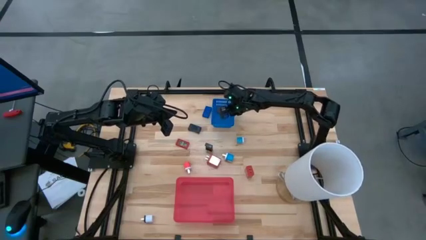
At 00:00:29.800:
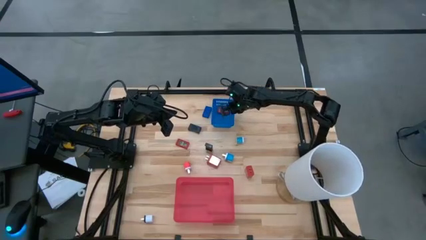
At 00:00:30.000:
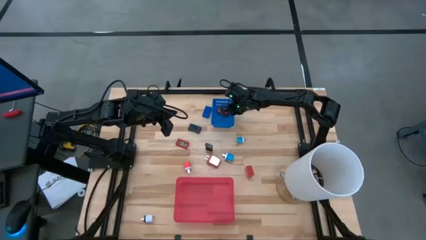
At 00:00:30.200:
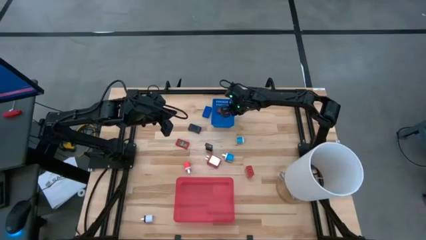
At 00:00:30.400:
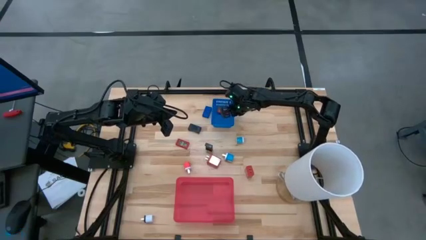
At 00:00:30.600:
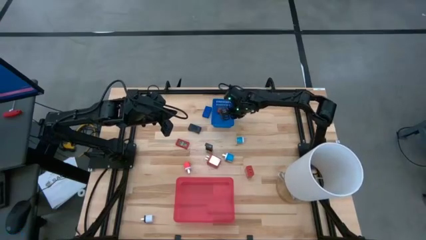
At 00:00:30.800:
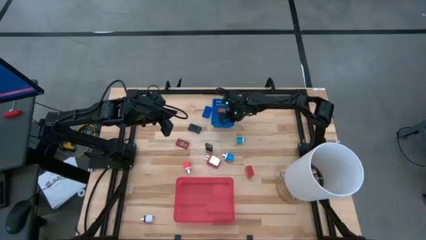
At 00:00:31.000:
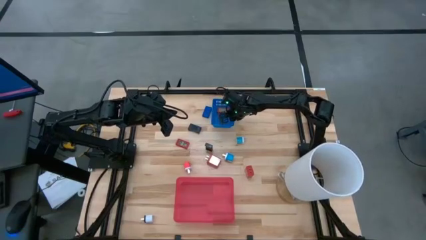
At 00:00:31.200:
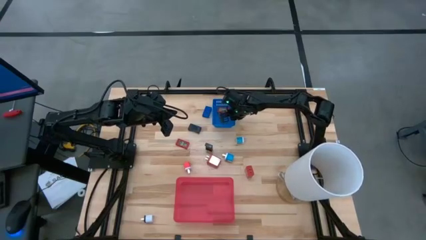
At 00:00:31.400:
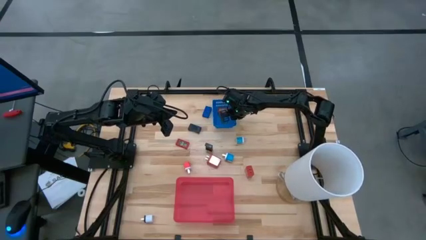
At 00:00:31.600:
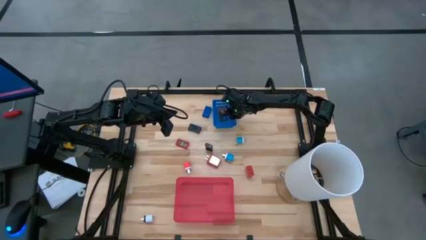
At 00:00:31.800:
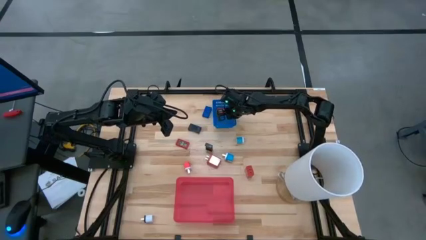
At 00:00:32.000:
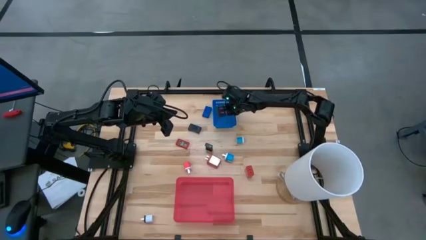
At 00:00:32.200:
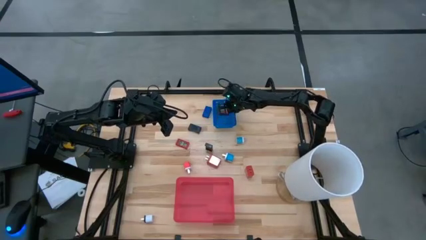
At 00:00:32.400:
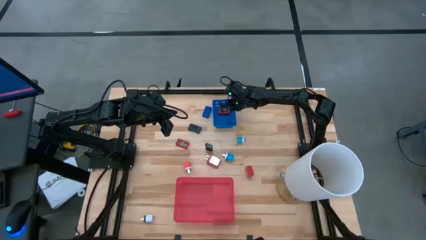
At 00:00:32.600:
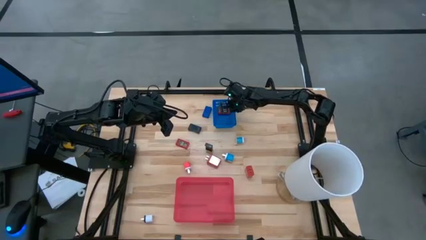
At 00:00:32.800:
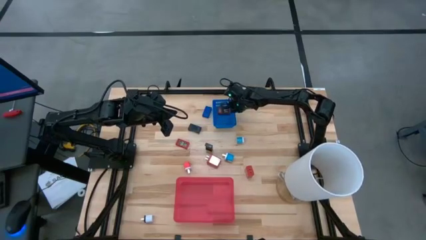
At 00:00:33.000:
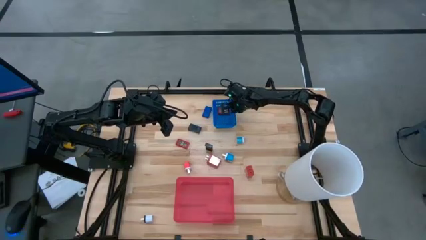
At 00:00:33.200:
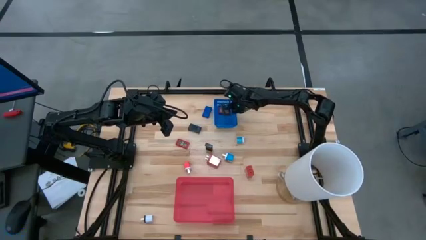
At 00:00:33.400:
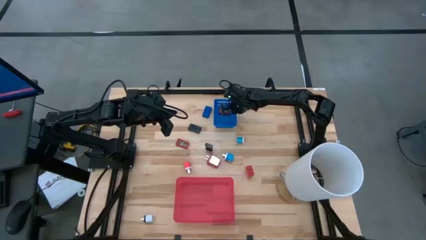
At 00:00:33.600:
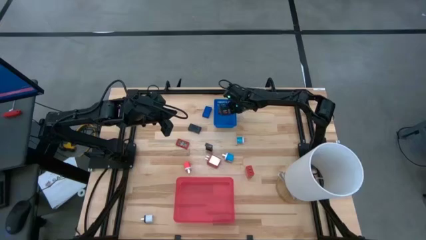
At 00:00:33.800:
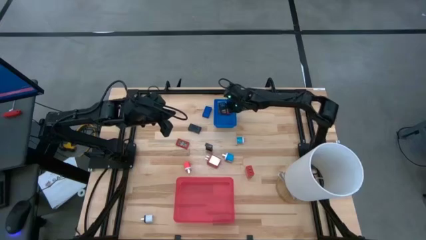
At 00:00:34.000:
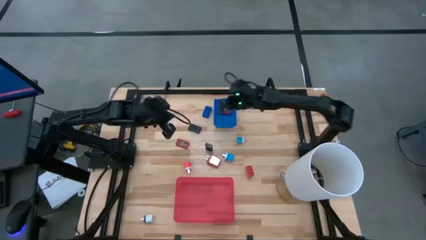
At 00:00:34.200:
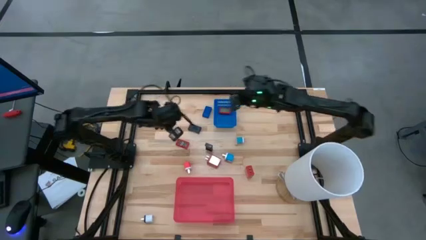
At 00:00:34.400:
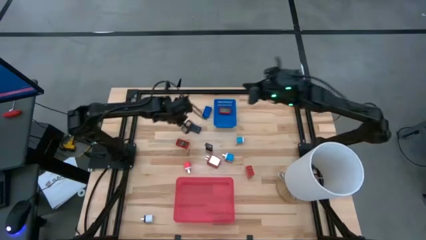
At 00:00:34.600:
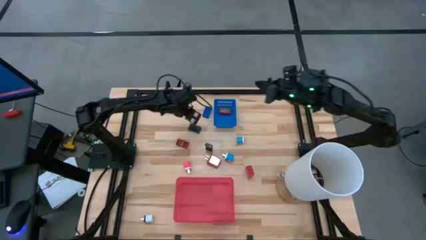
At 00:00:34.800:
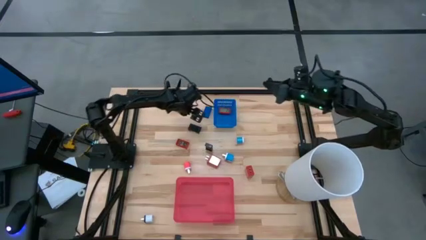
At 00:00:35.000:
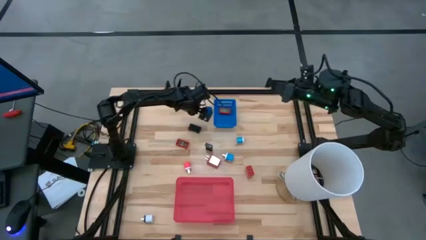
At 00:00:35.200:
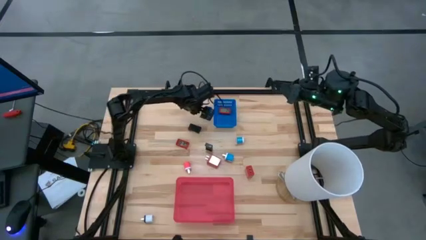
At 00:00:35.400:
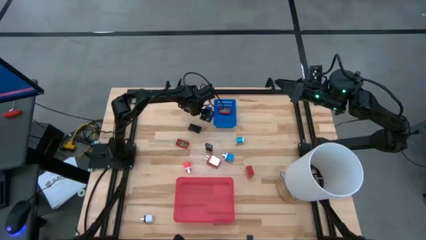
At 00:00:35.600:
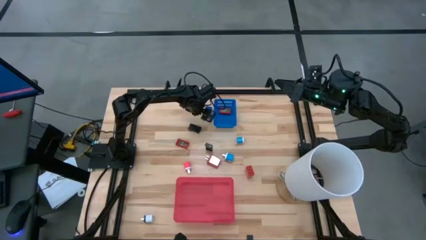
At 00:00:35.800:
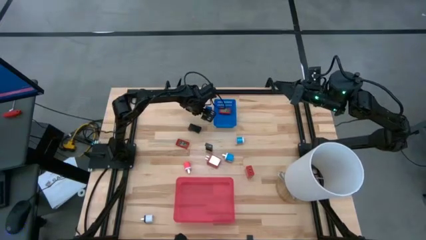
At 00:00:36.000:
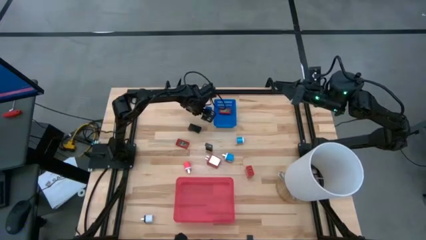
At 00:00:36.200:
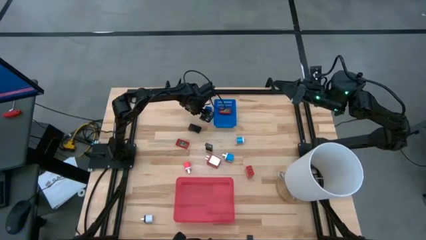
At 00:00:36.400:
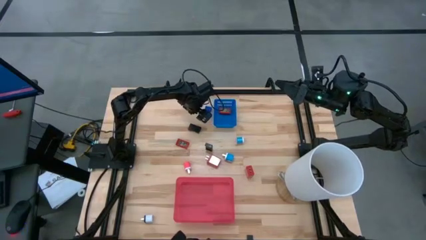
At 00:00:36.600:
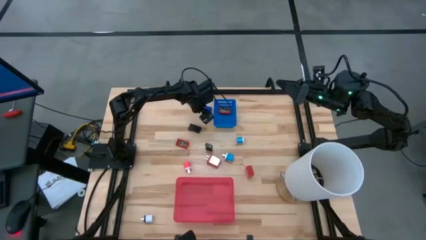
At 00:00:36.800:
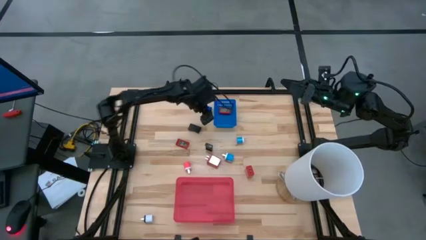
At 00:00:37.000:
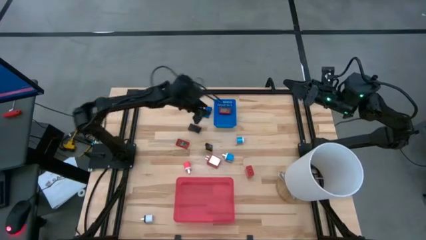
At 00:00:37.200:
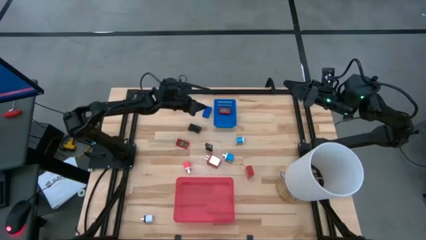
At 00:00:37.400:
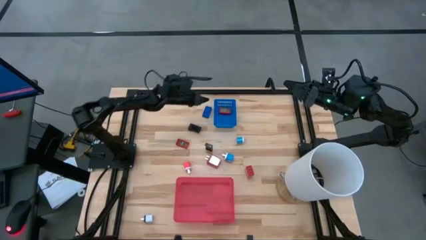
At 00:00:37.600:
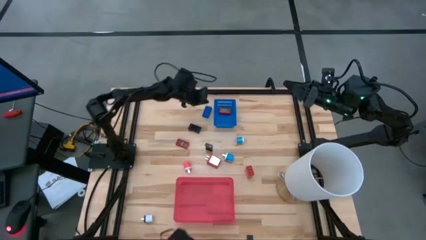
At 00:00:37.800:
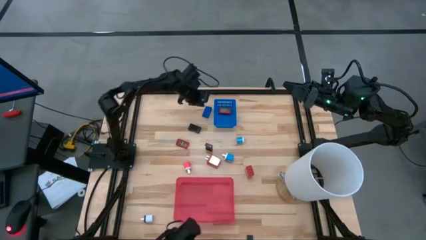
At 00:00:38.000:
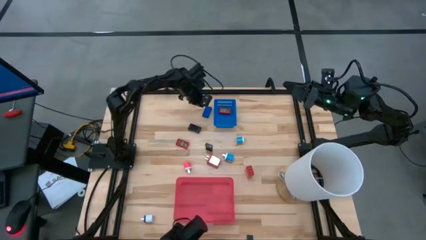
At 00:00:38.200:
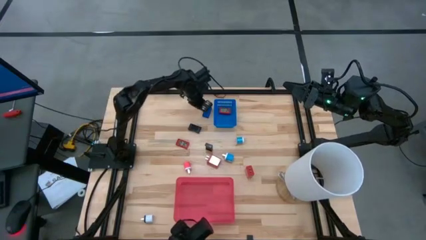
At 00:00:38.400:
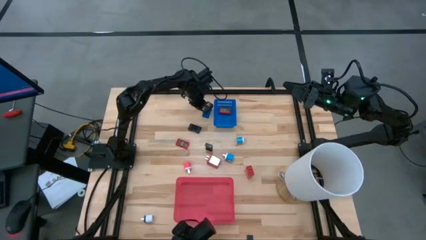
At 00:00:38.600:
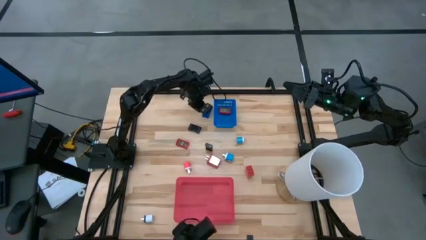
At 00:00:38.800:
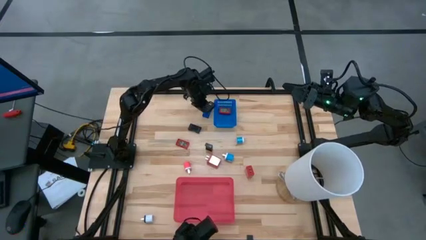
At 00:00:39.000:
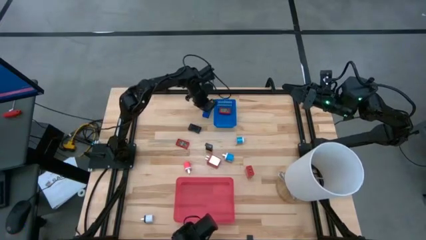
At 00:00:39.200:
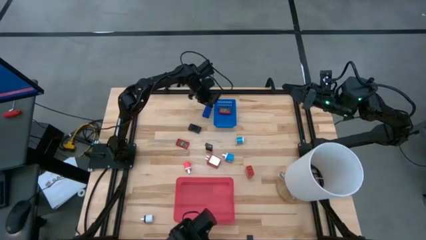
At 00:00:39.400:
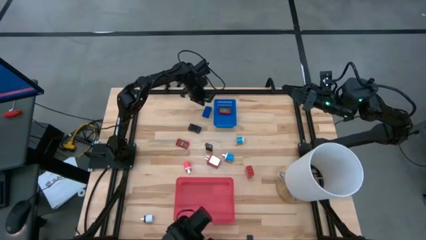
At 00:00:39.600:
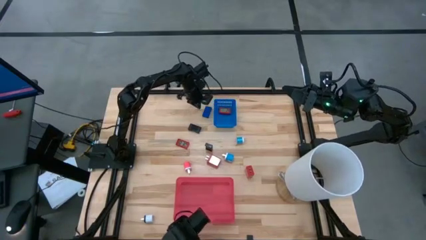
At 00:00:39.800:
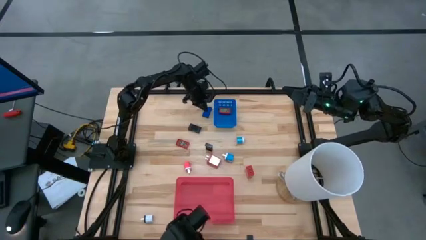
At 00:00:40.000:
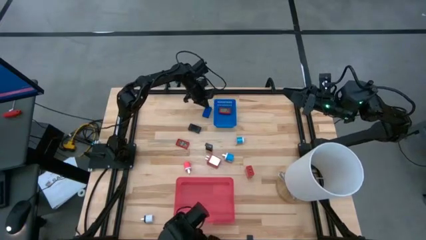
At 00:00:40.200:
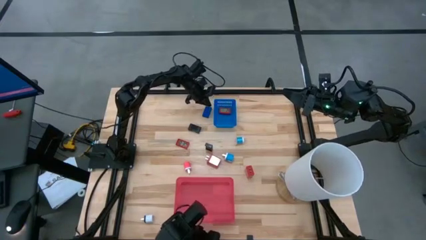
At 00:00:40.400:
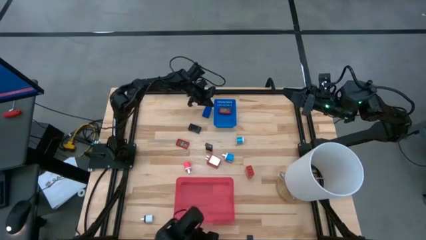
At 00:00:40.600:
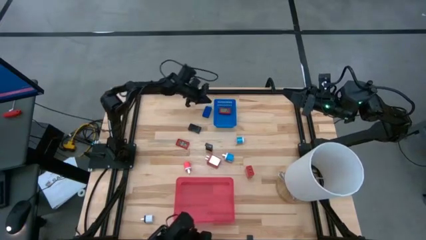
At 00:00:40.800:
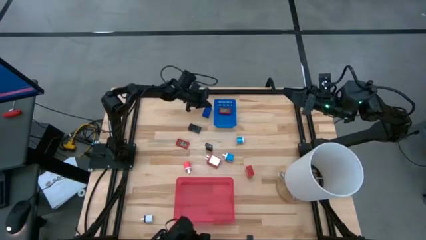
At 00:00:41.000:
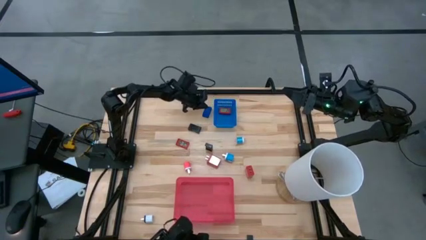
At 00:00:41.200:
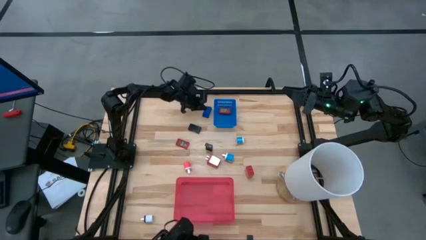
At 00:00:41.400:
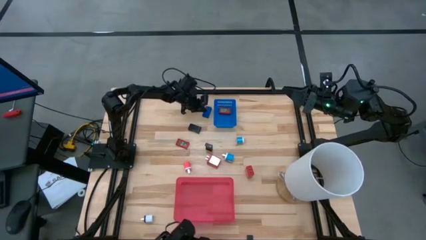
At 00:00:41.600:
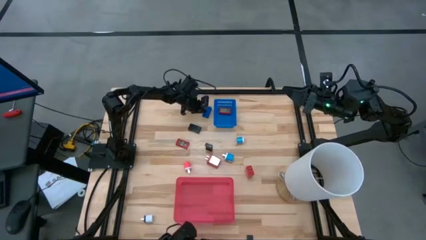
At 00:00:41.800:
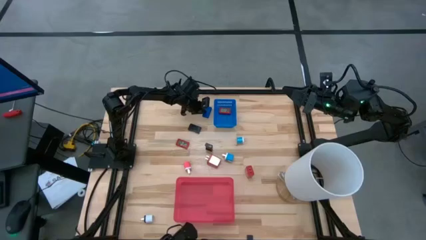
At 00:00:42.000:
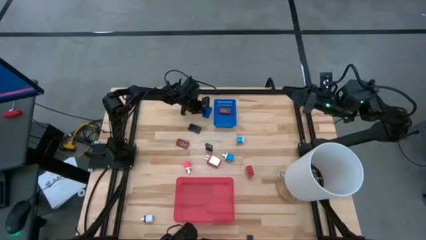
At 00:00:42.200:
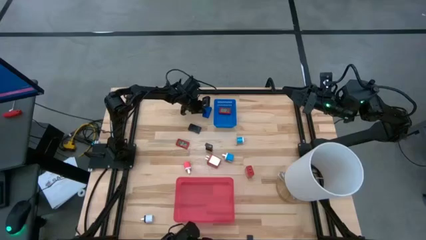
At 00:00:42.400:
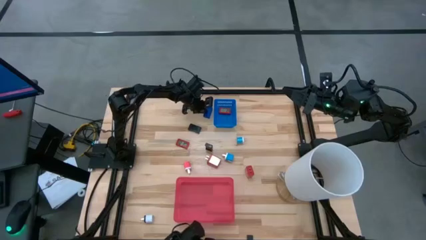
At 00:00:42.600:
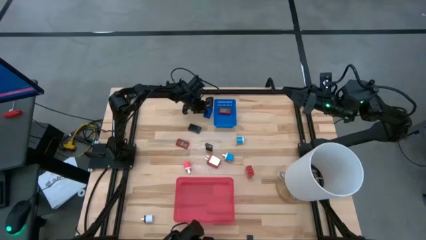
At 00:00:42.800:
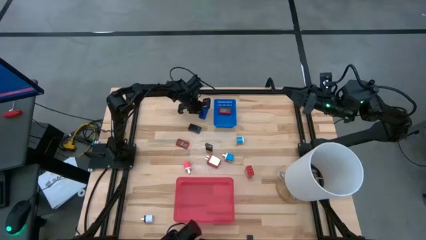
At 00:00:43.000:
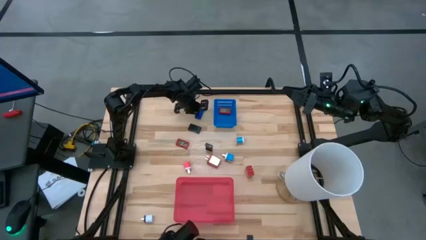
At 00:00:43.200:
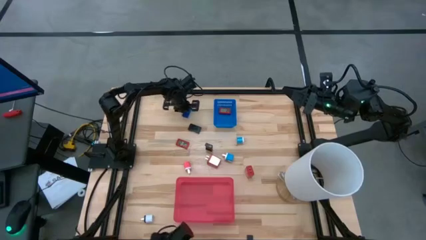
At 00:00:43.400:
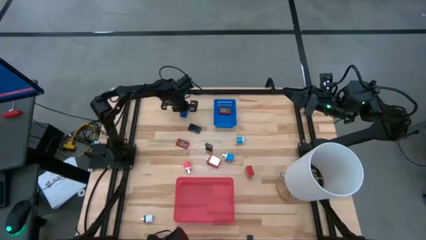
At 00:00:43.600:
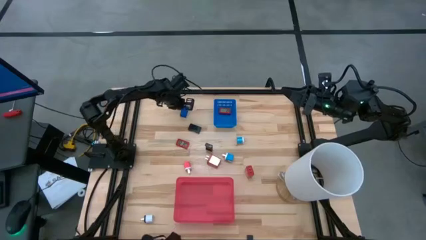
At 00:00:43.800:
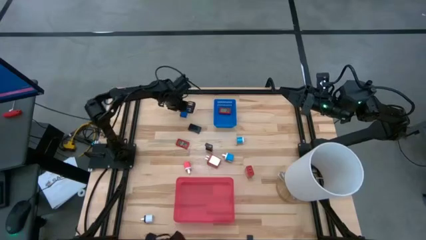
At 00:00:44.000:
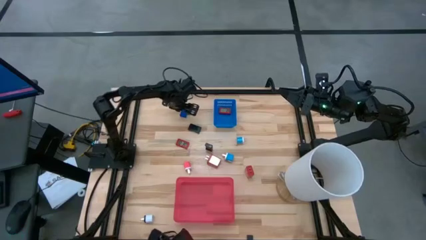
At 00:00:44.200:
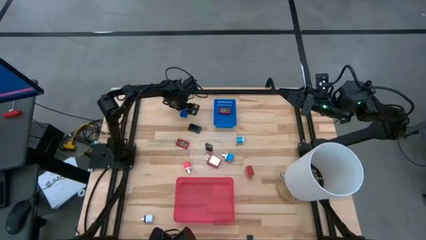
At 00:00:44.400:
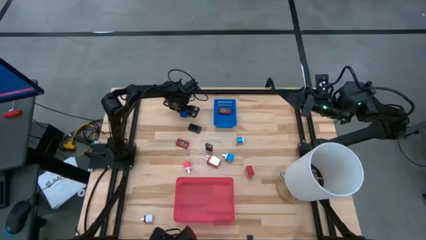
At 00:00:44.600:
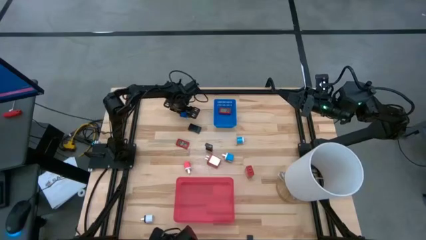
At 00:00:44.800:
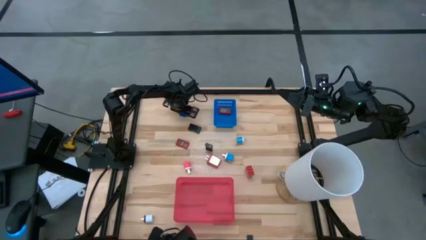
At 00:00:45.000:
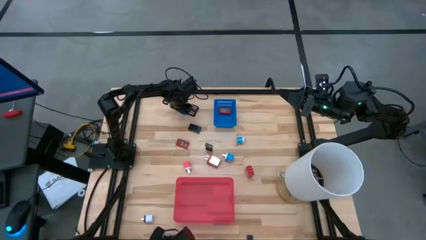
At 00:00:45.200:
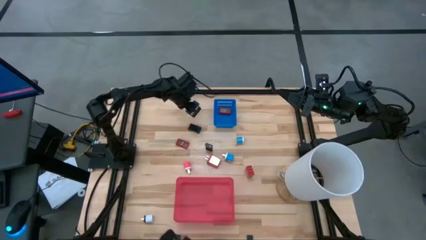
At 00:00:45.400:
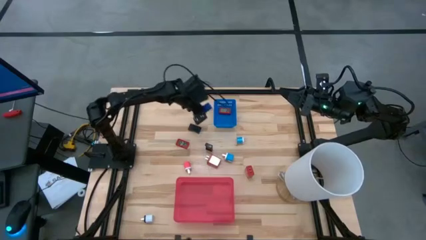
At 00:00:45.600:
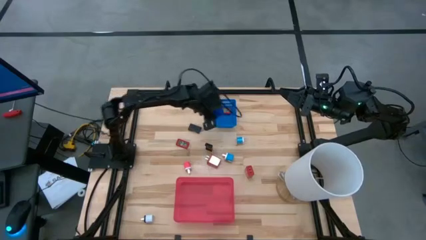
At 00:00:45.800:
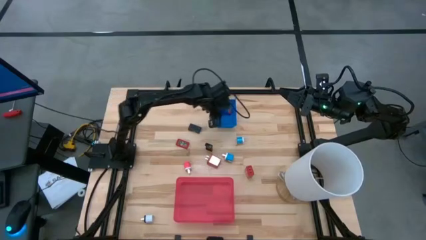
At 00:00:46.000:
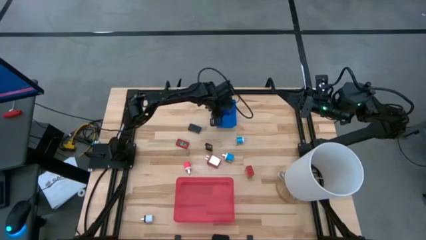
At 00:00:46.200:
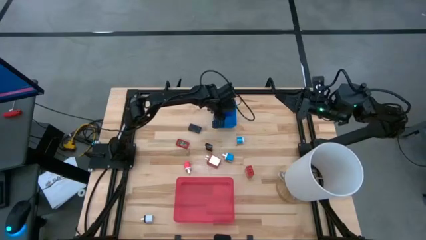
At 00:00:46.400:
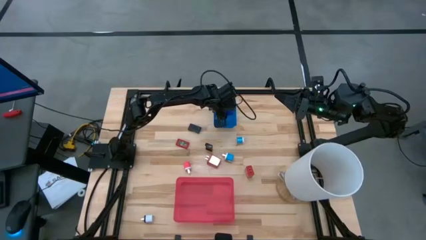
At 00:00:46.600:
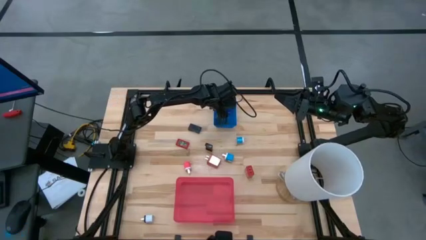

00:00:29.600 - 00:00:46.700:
Task: Pick & Place Office items
Put the blue digital clock into the blue bin
